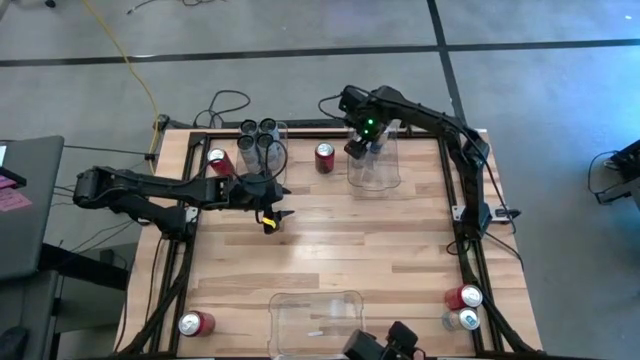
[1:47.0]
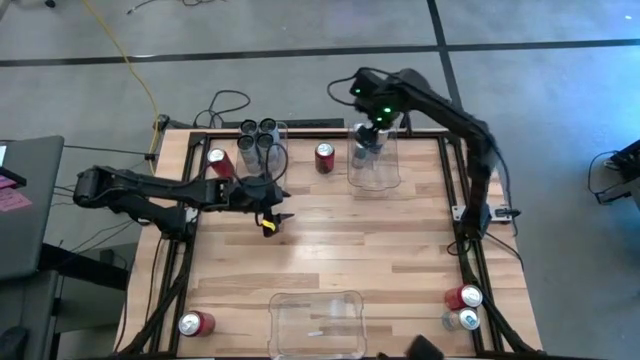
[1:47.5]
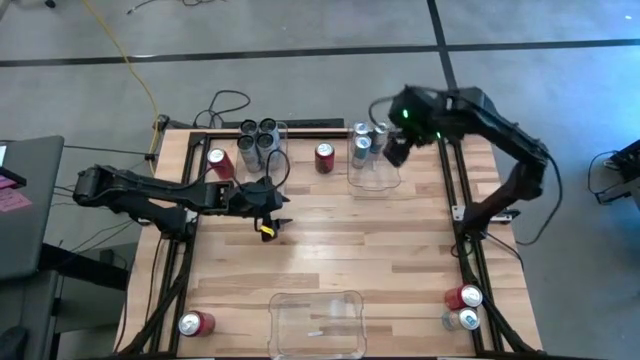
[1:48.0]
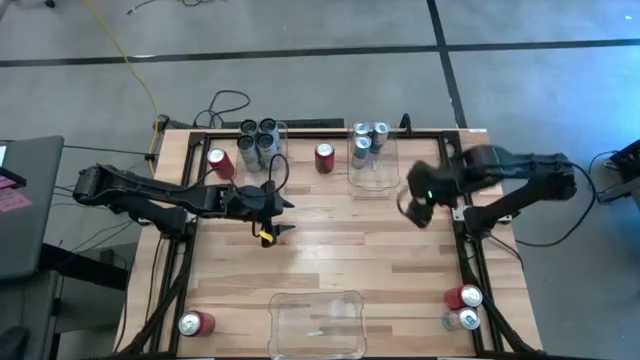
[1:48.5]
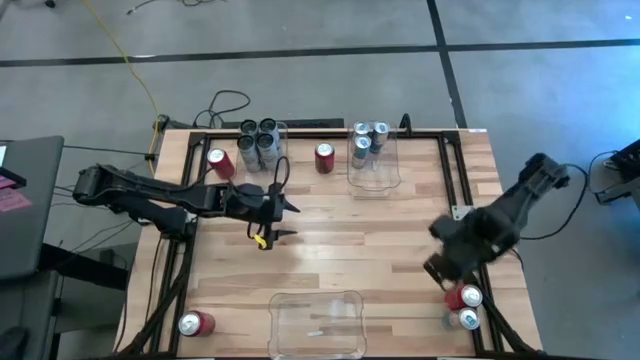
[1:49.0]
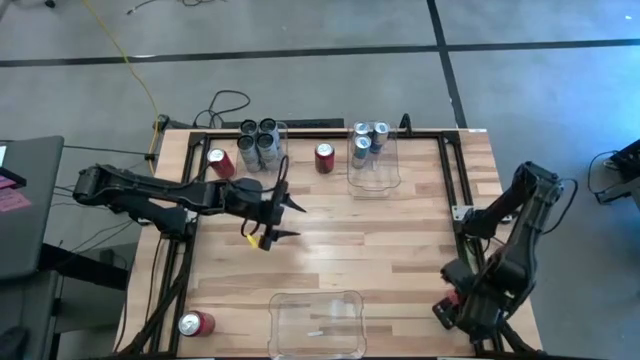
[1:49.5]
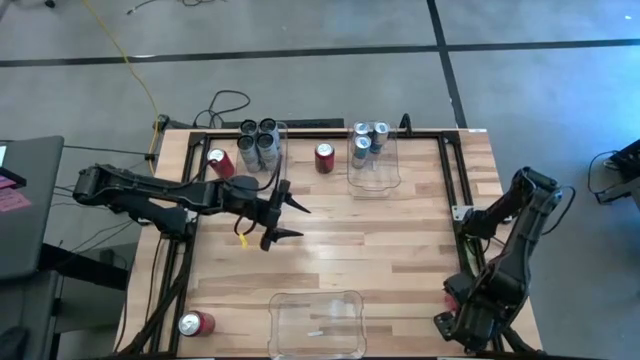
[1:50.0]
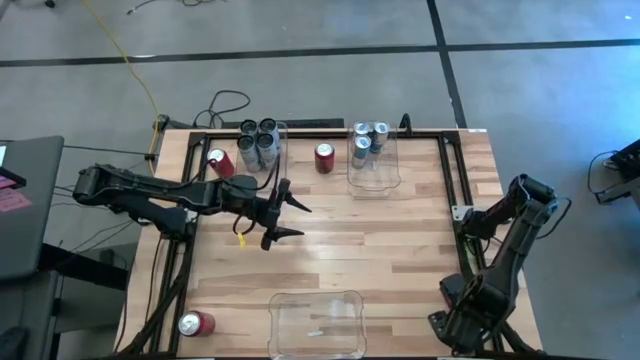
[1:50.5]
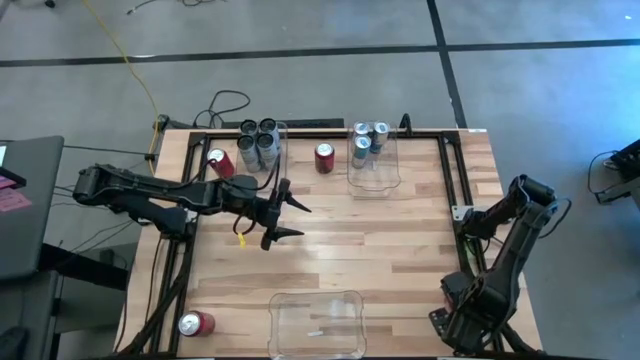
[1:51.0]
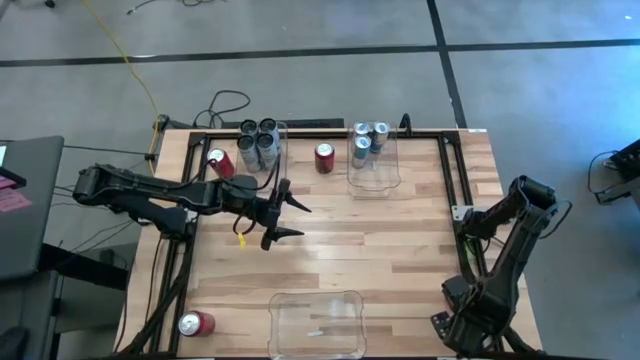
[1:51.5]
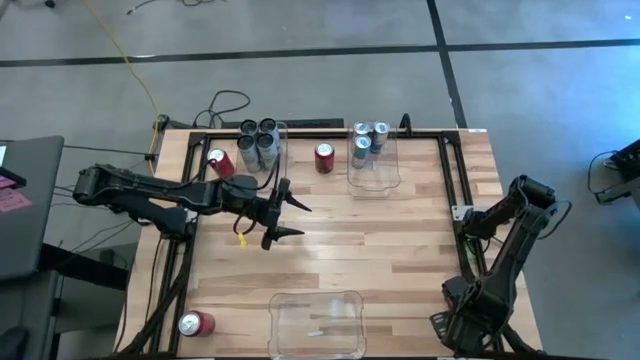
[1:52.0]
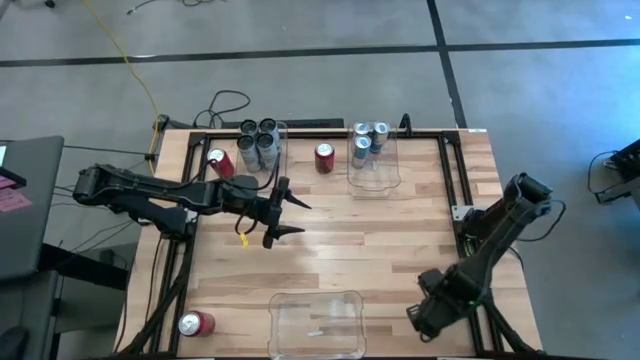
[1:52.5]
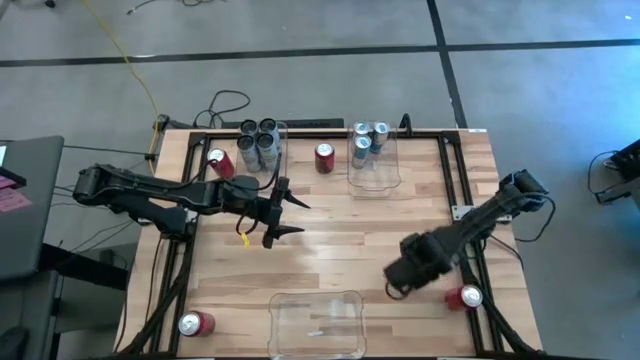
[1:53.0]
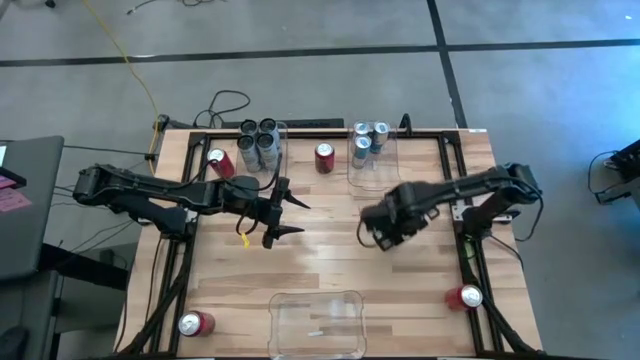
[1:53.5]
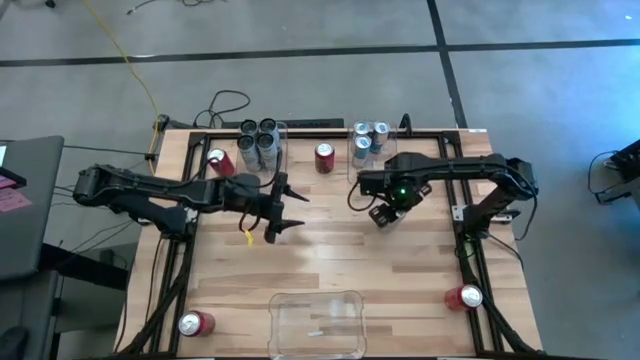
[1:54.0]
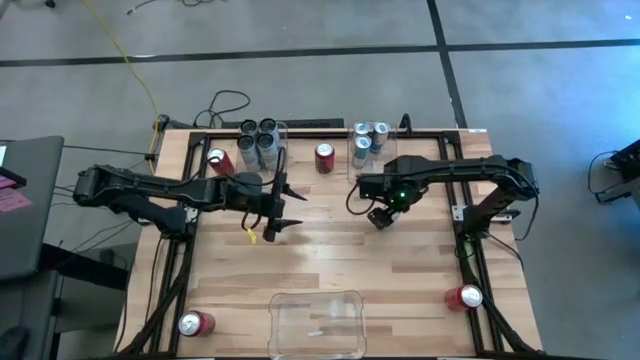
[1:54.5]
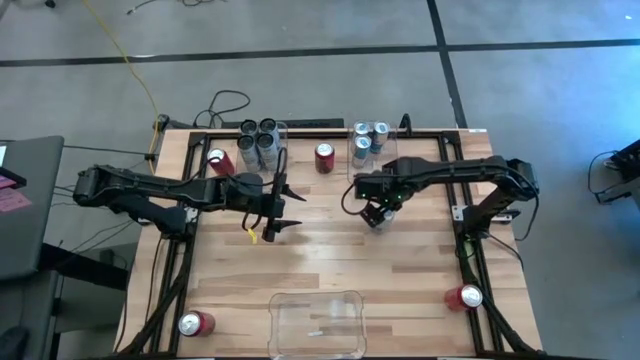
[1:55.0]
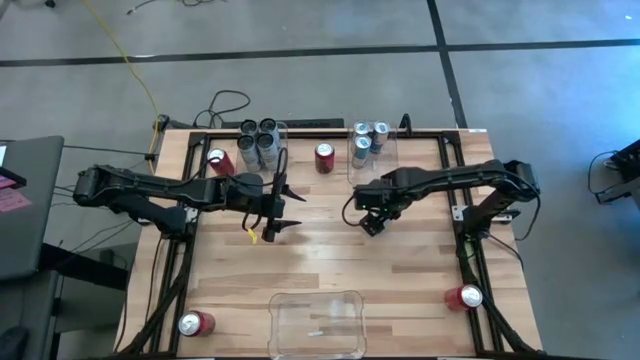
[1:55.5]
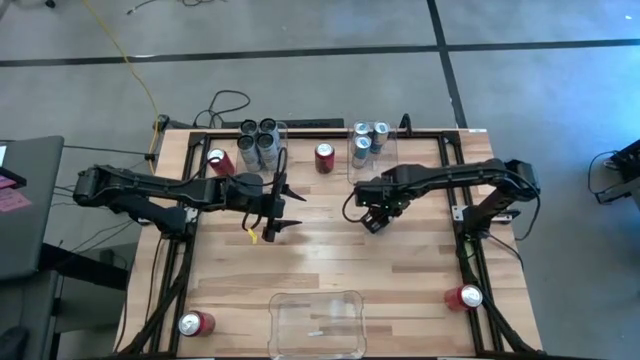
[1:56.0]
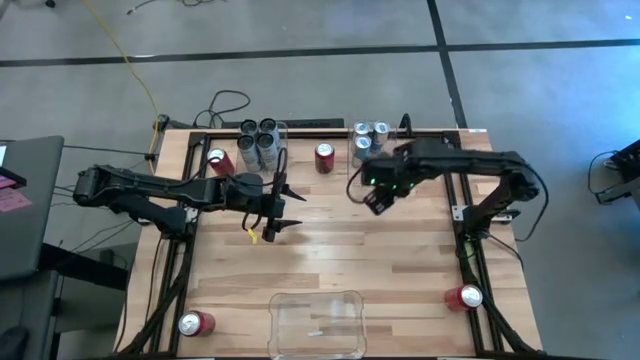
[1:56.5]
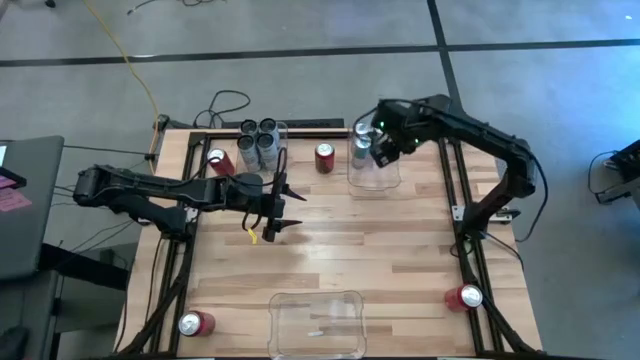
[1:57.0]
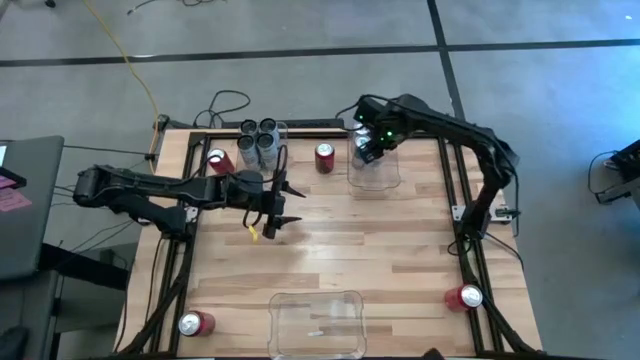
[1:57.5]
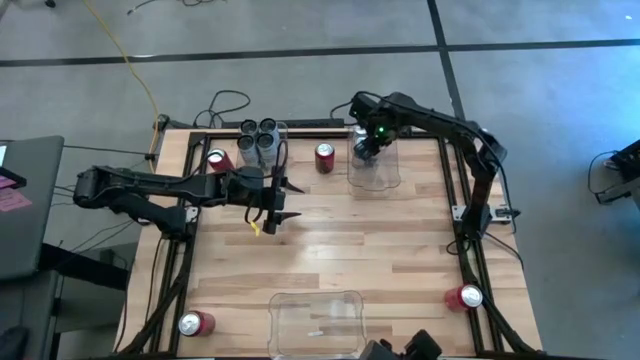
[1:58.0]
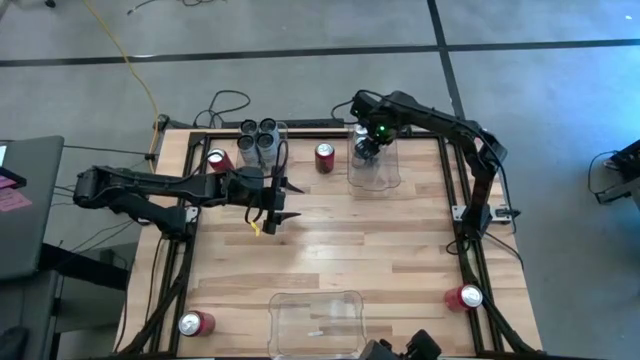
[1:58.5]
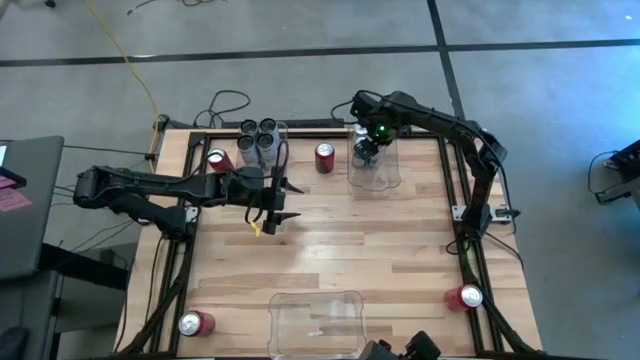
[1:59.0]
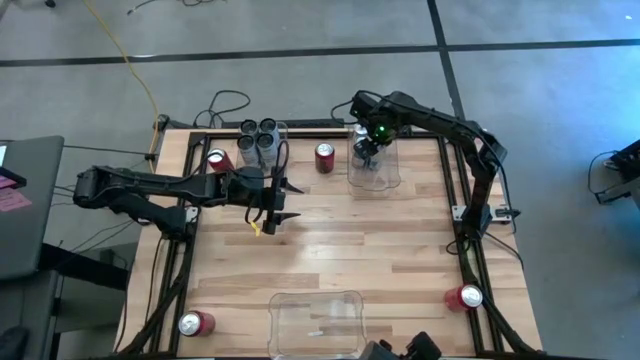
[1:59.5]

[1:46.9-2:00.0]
Task: Sort soda cans
Put the blue soda can into the top right transparent bin

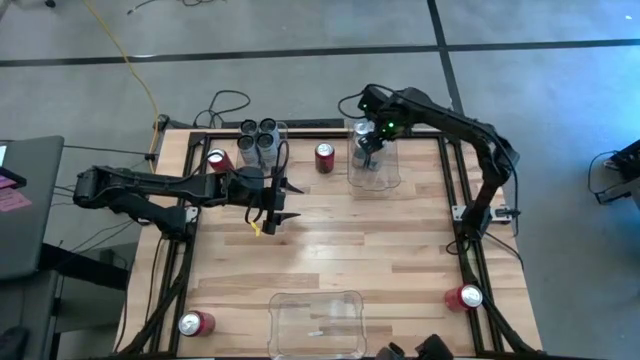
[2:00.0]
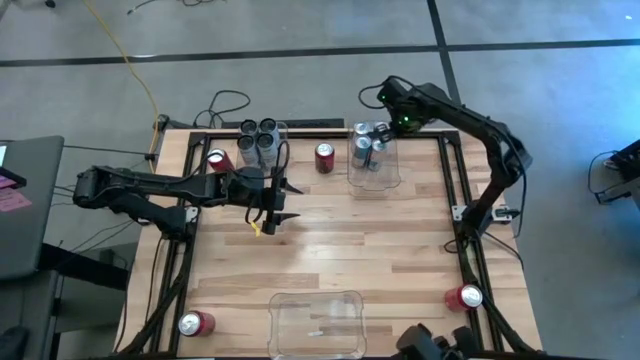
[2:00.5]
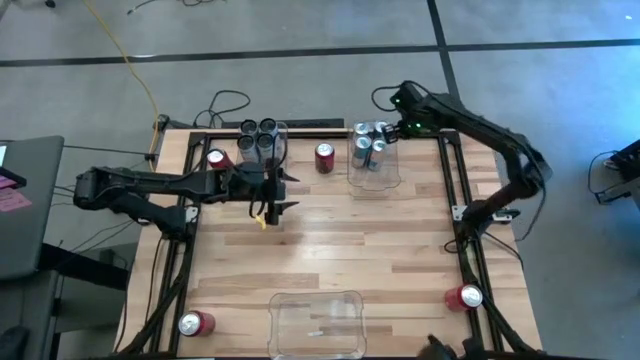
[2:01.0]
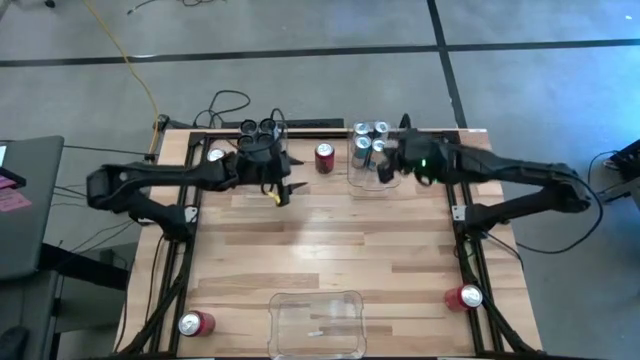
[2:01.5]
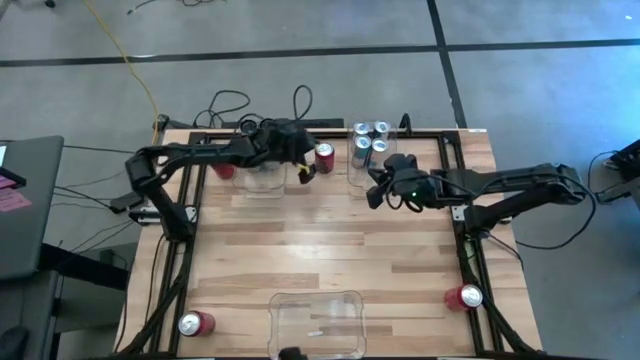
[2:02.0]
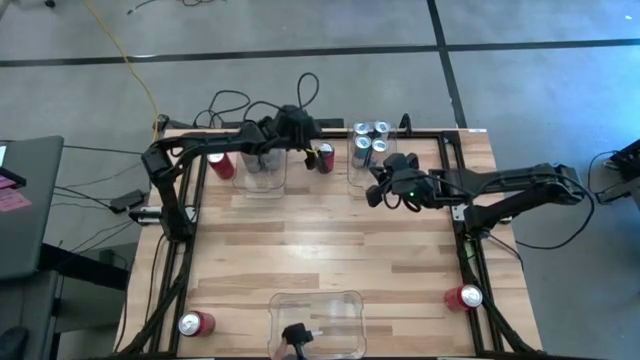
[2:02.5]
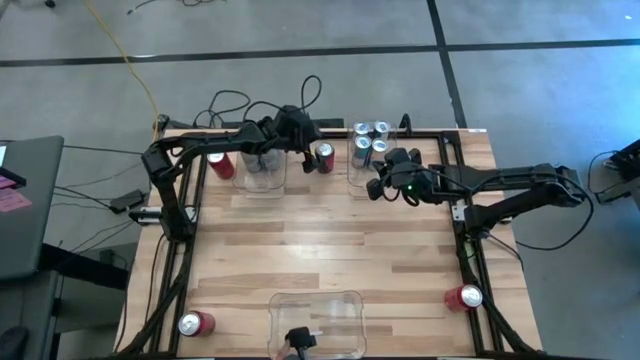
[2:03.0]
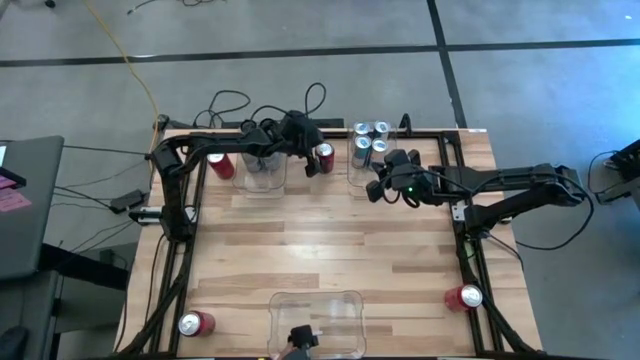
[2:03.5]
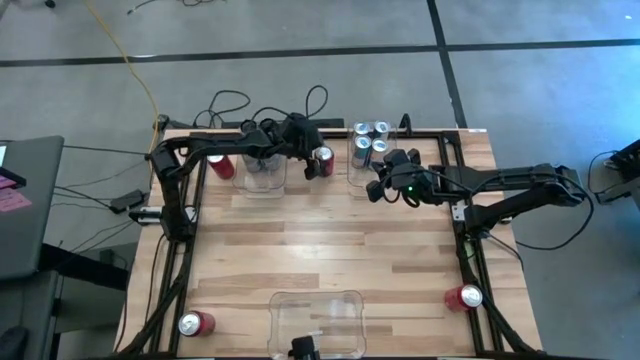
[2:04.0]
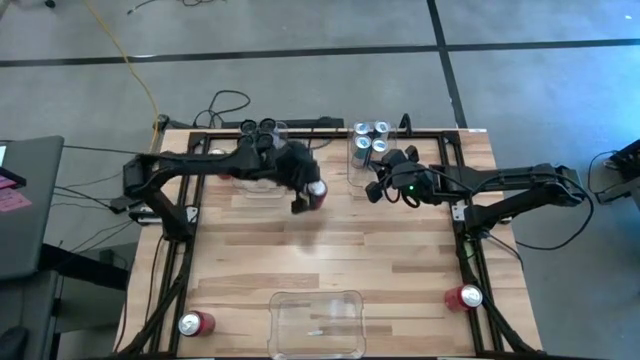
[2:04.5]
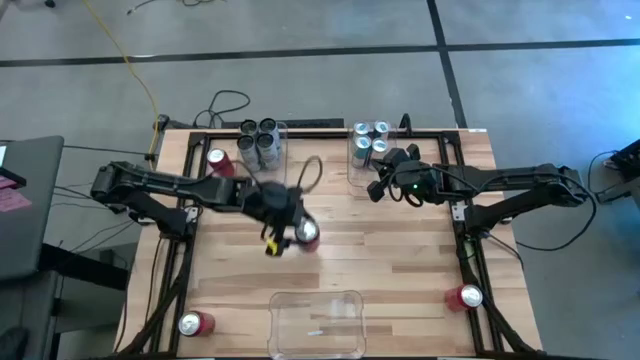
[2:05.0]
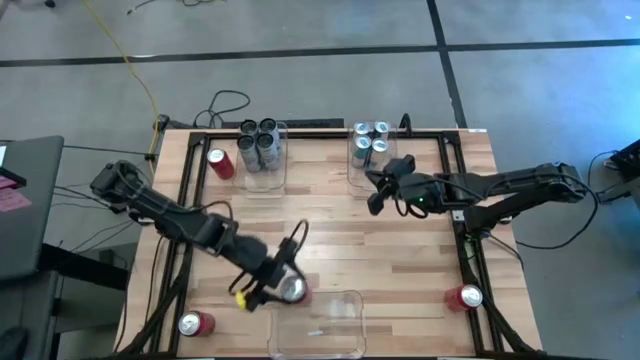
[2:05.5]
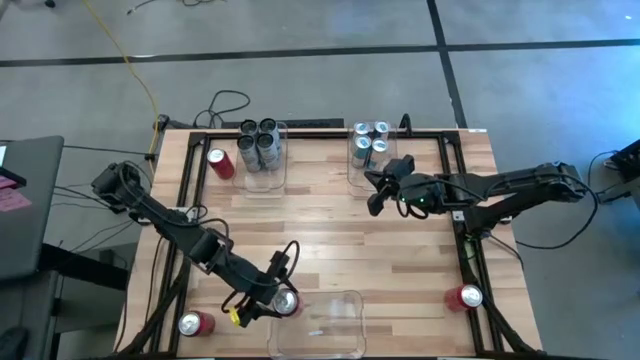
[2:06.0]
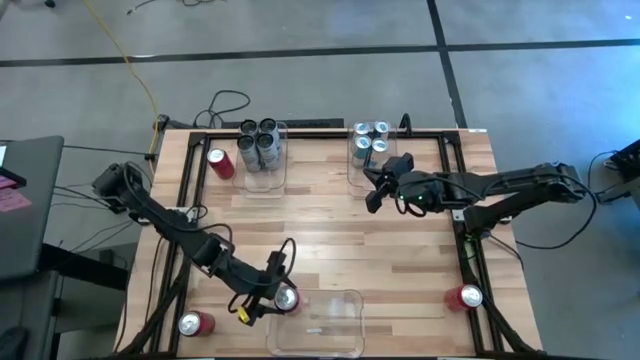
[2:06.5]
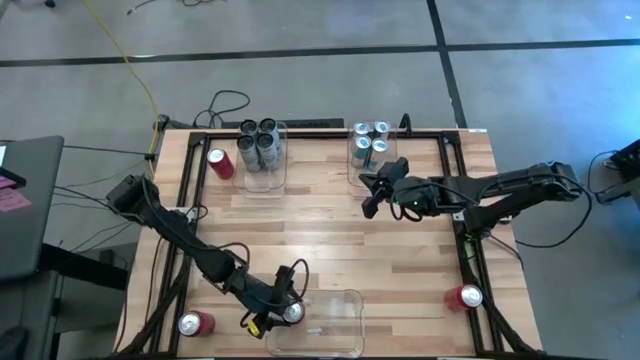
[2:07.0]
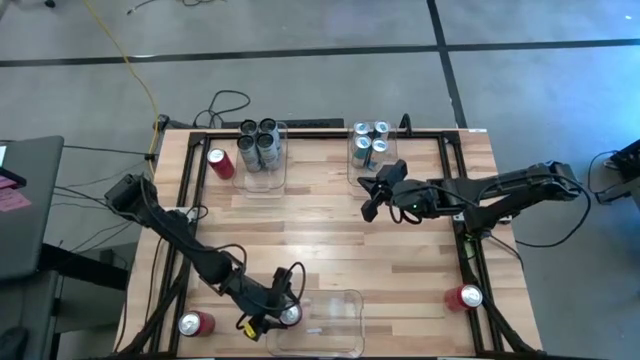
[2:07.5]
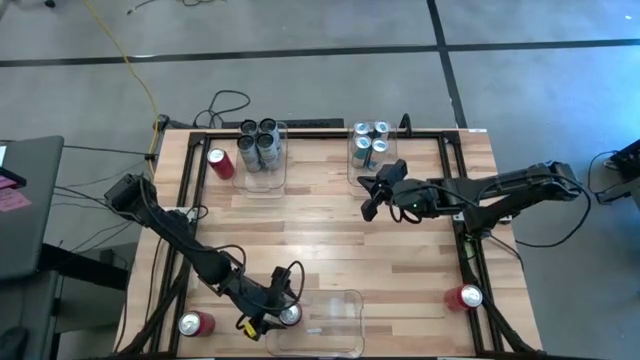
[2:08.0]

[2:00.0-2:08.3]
Put the top right red and black soda can into the bottom transparent bin
